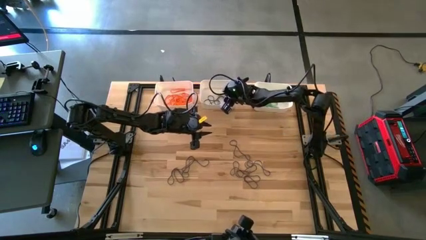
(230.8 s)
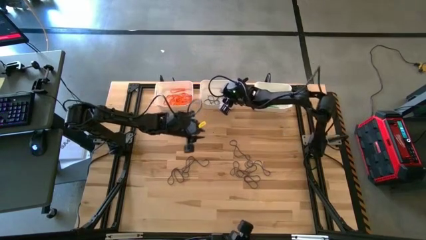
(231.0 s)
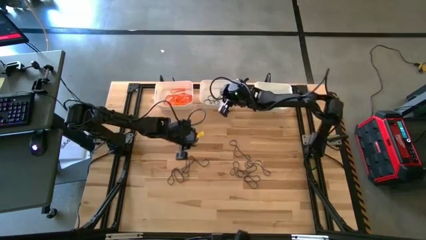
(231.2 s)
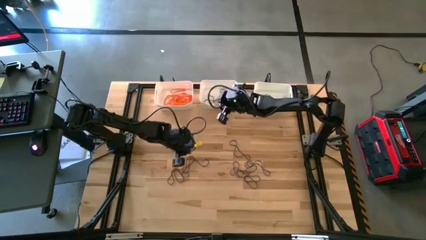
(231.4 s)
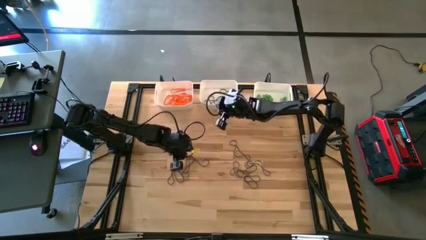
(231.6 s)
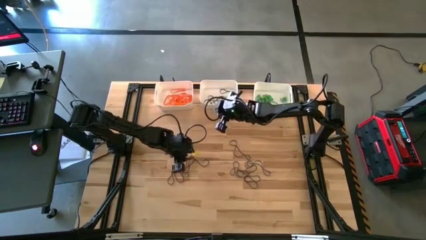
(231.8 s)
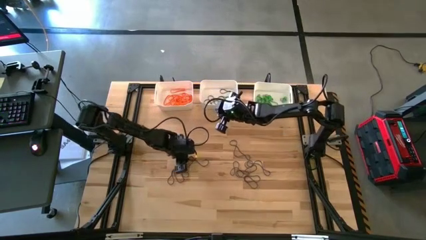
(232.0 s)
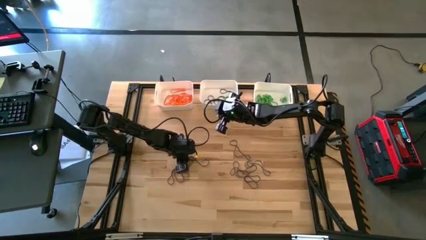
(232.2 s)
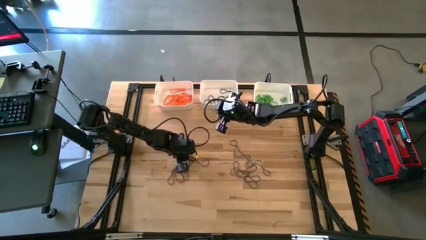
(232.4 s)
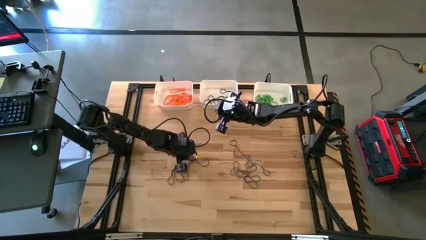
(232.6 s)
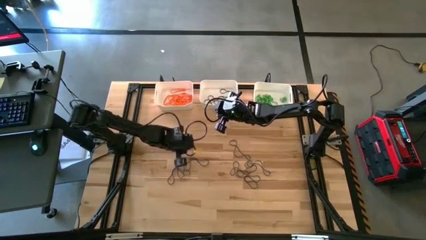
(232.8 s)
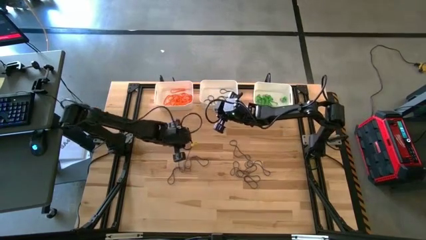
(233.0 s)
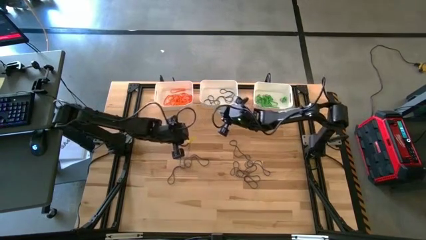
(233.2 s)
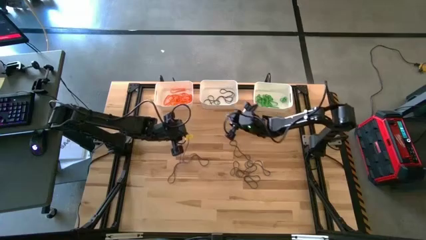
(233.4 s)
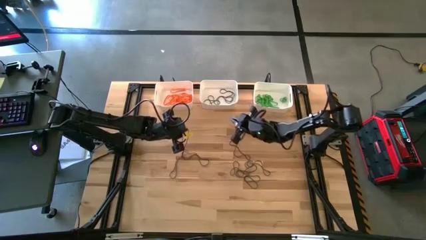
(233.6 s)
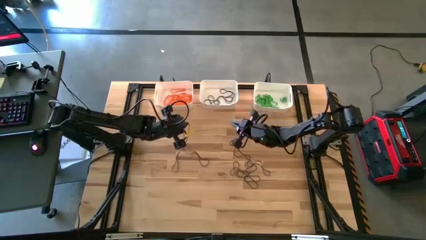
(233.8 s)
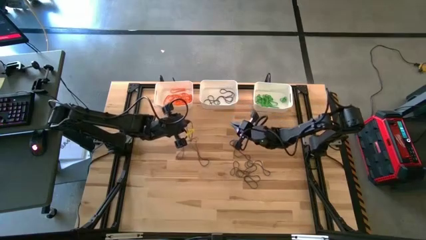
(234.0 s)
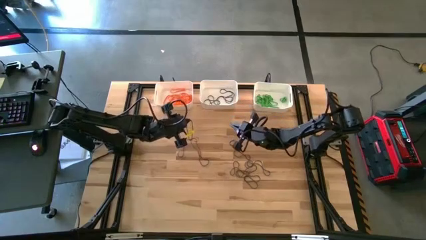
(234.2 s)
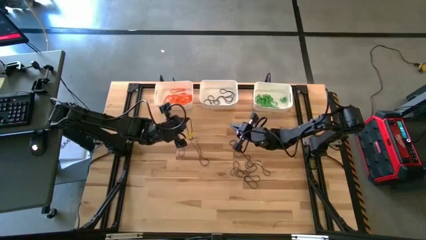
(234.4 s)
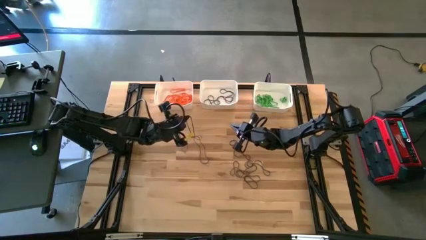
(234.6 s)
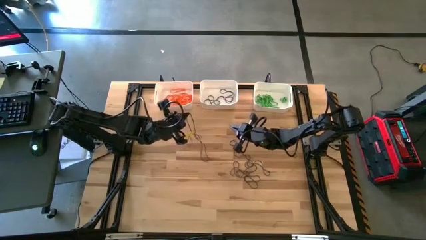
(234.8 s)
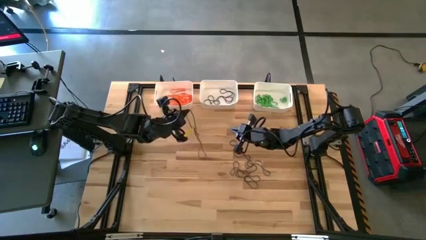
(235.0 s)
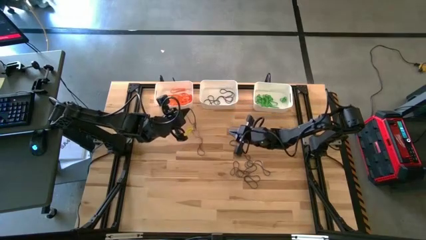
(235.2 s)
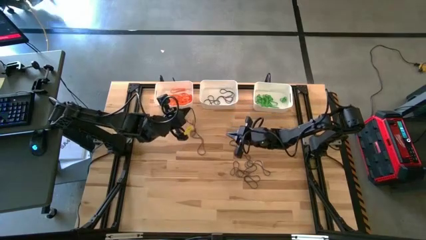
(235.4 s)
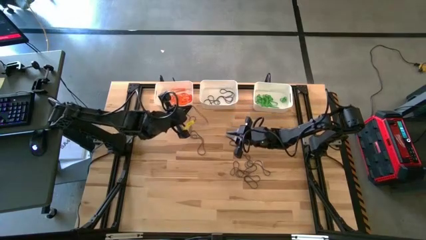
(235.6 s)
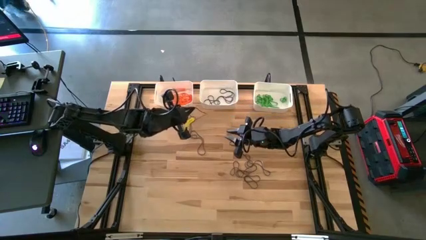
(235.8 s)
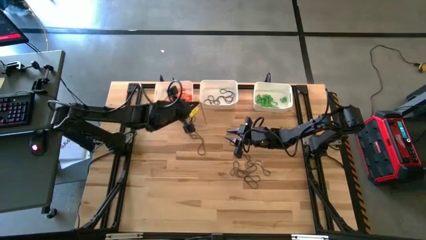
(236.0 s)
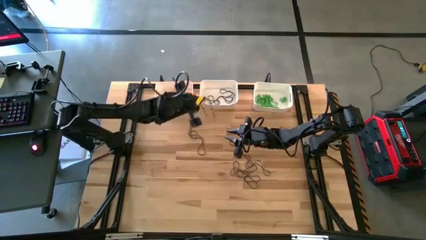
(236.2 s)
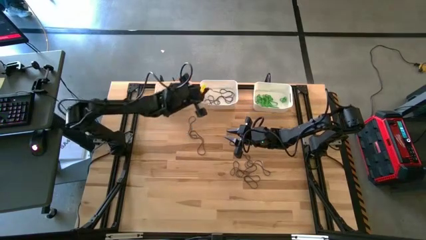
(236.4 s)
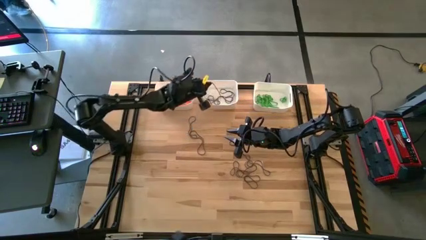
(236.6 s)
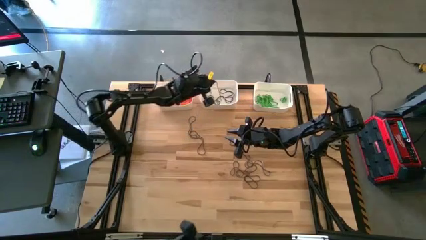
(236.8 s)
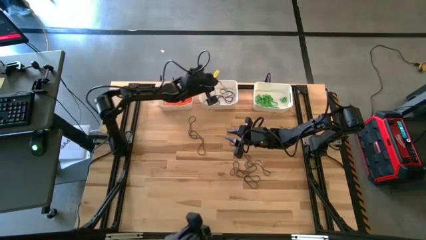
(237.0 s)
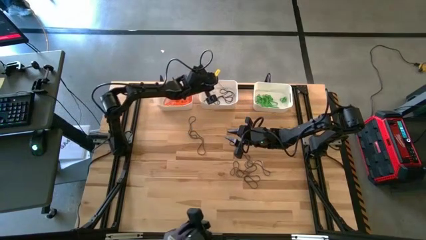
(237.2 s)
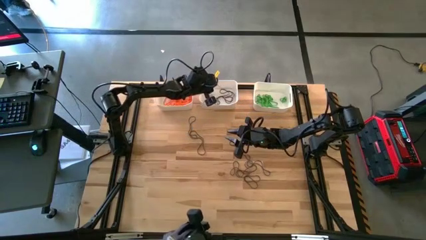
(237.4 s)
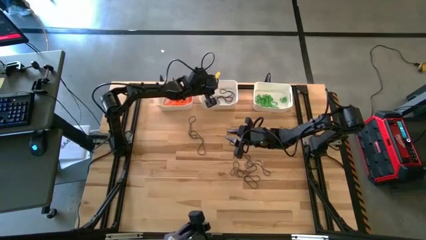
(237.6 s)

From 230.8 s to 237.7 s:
Task: Sort rubber bands into baskets
Put the purple rubber band into the middle white bin

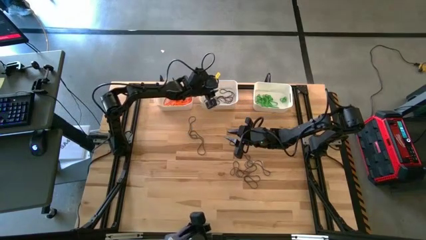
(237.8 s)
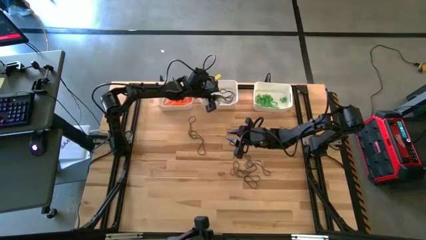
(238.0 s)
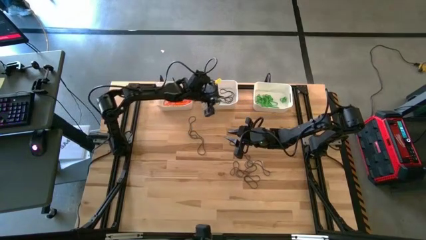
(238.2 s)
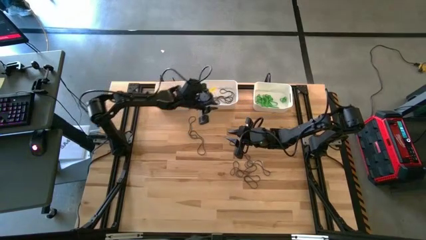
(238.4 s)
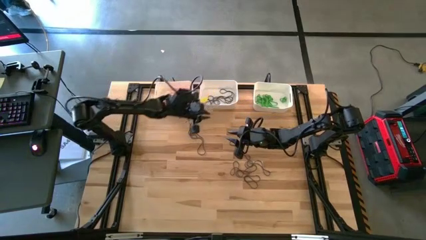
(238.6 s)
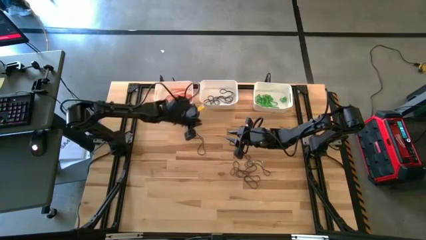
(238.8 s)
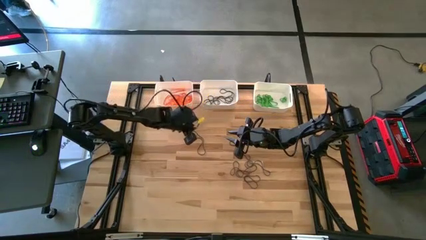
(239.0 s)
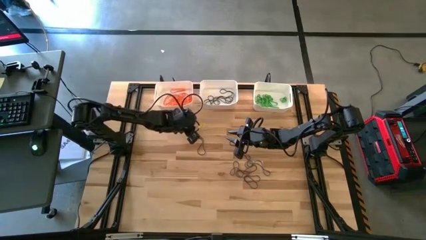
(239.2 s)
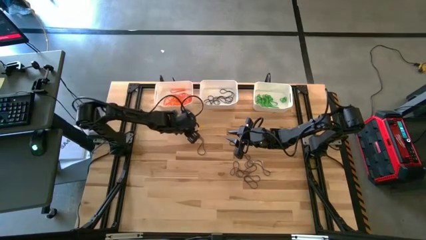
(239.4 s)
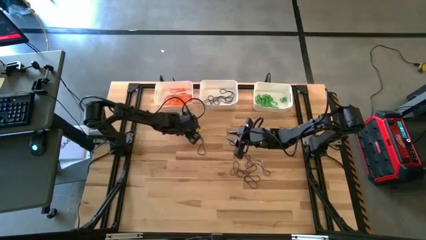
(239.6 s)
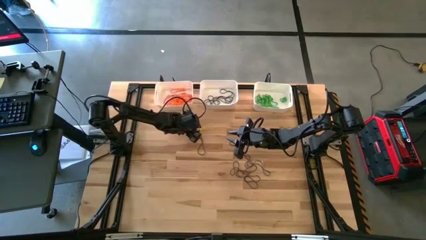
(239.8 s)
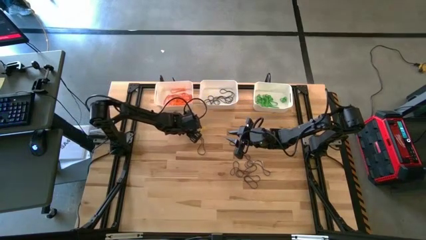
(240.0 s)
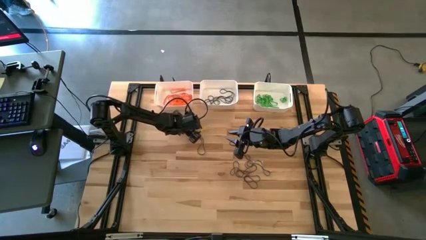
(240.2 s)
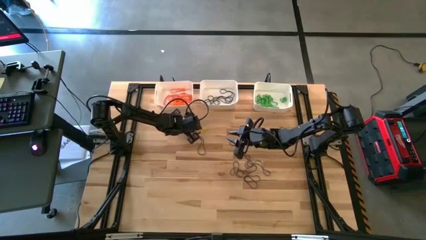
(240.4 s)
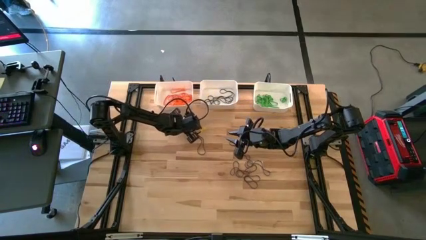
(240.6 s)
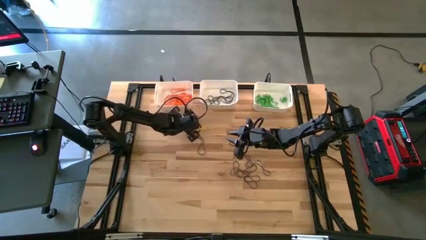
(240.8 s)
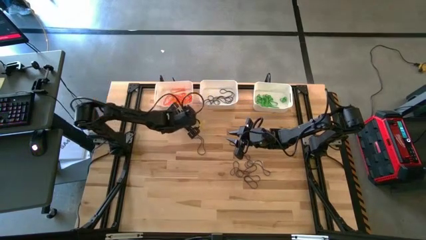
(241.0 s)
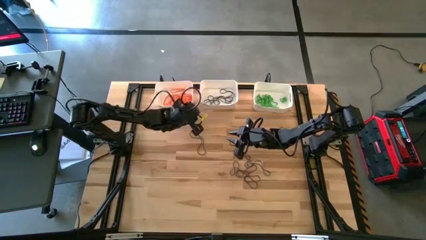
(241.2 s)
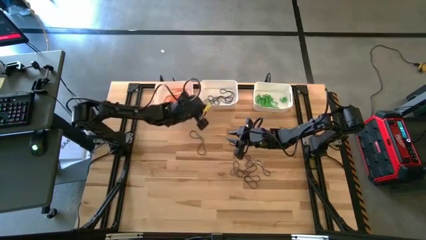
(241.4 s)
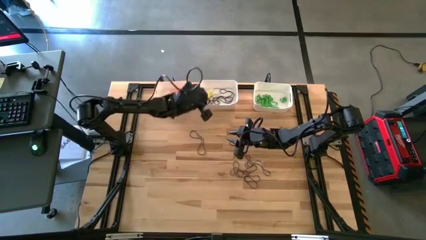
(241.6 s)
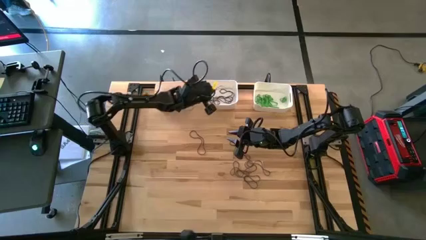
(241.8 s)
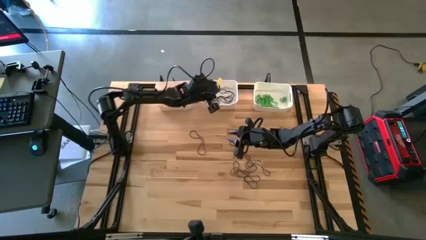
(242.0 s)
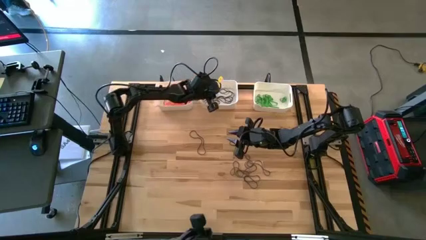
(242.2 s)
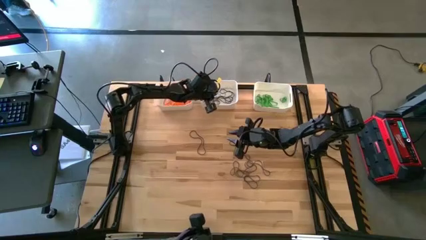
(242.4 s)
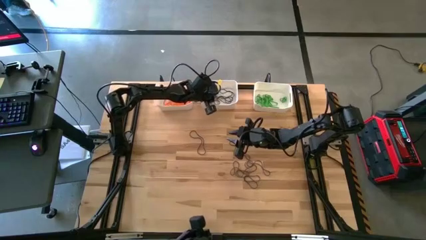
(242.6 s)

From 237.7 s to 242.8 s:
Put the purple rubber band into the middle white bin

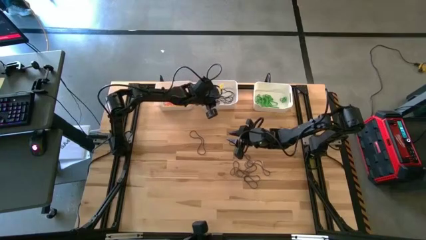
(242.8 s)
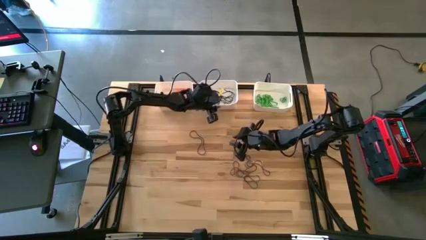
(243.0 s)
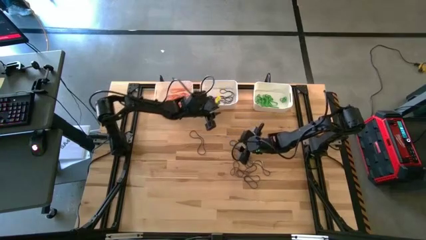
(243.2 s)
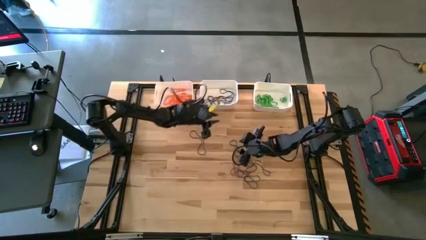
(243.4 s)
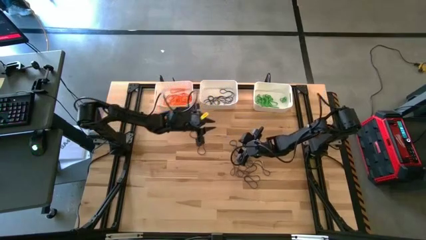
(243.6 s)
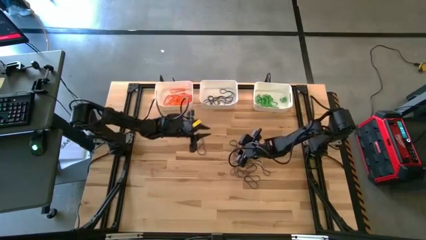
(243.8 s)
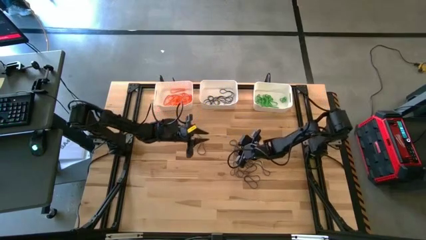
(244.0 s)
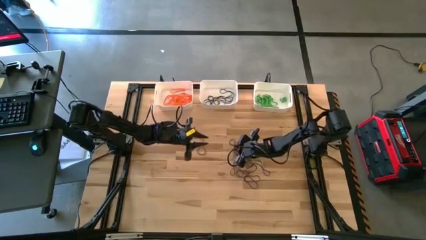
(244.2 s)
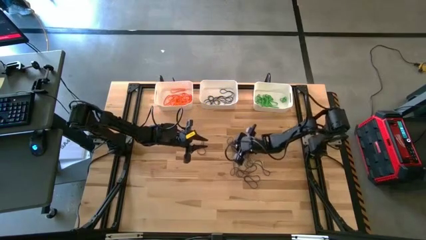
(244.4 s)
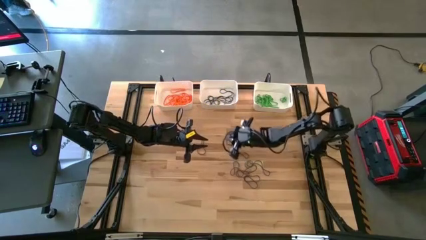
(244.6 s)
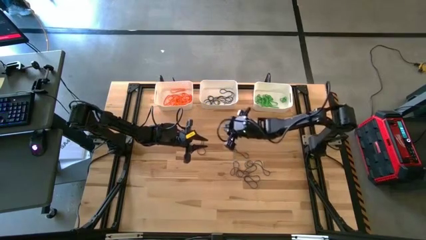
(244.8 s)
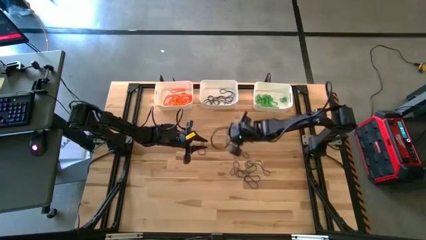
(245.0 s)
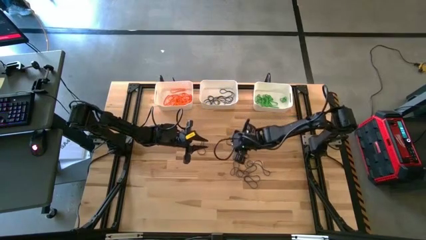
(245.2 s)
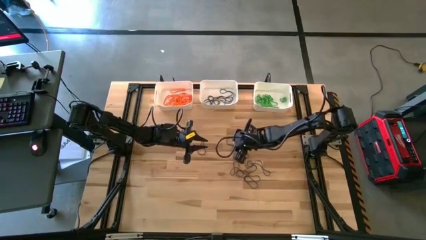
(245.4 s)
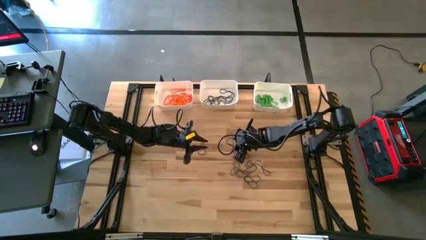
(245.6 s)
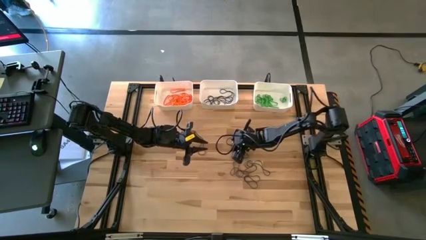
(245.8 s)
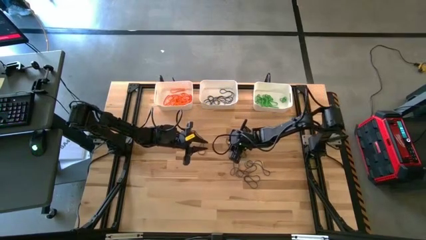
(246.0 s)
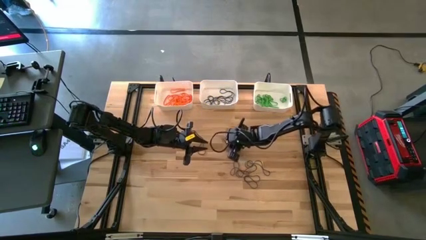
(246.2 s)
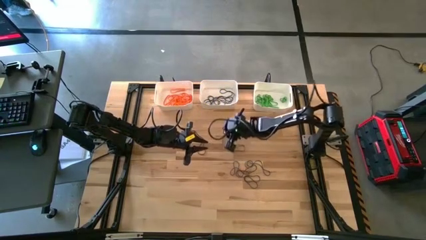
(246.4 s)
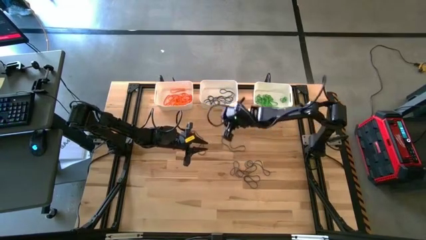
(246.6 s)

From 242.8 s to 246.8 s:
Put the purple rubber band into the middle white bin

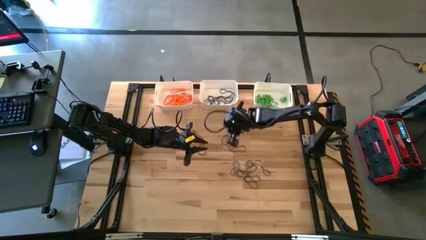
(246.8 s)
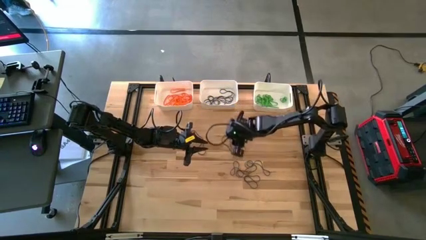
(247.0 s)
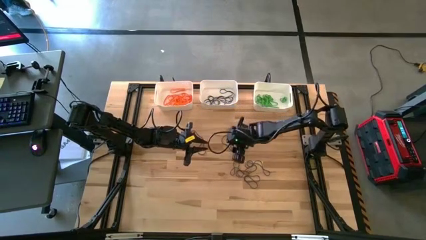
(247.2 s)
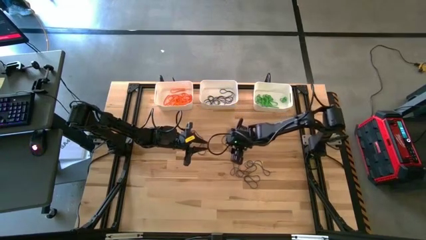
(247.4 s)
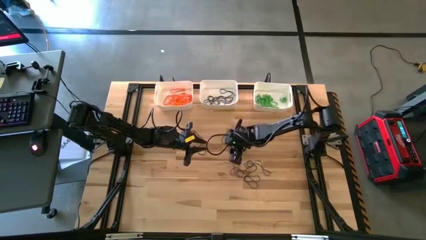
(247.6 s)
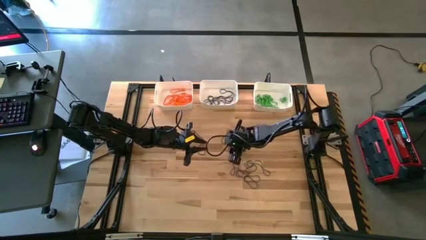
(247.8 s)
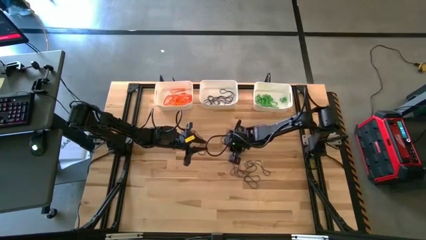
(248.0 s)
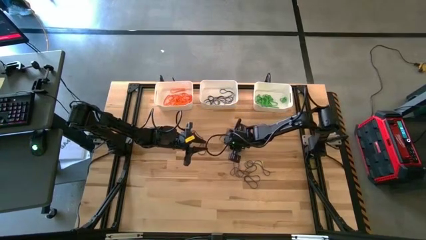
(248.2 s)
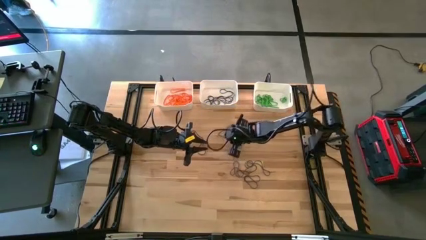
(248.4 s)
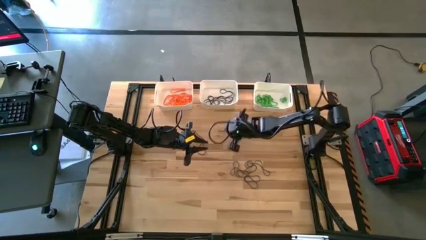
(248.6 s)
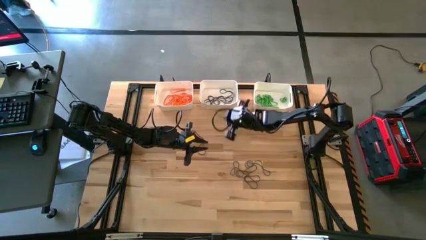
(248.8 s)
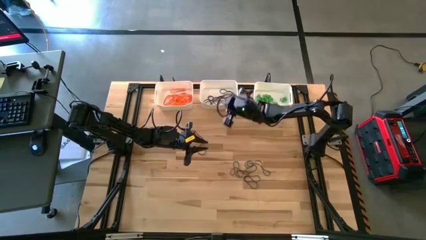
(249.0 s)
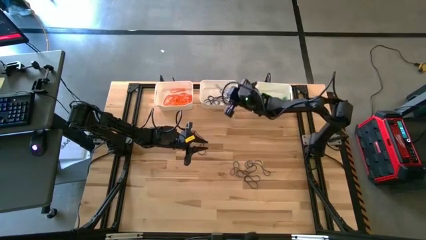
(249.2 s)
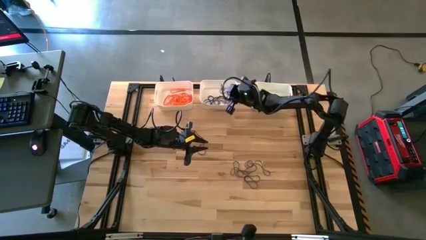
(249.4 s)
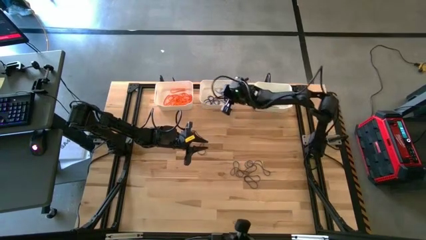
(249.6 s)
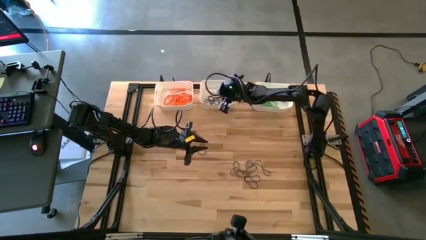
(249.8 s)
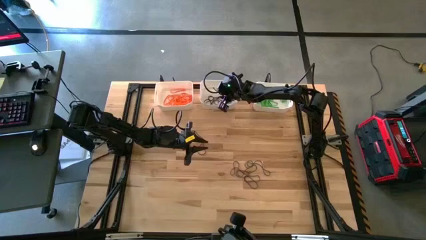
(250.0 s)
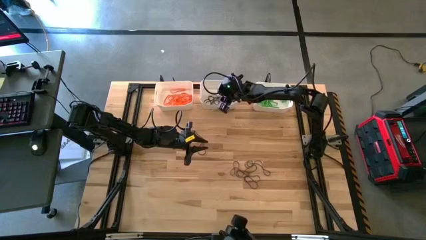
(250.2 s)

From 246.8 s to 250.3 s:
Put the purple rubber band into the middle white bin
